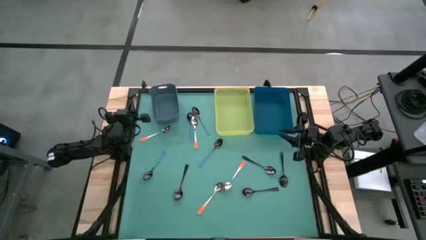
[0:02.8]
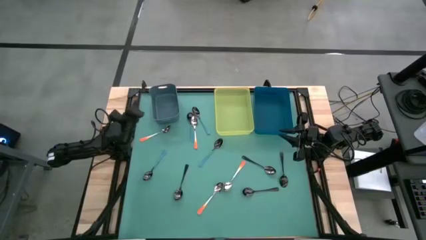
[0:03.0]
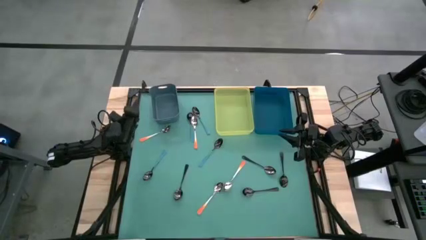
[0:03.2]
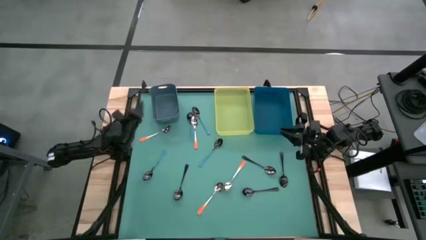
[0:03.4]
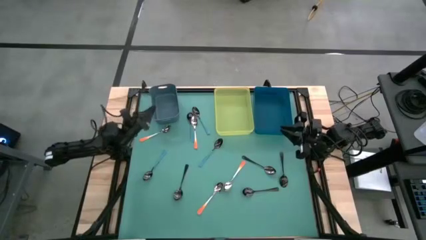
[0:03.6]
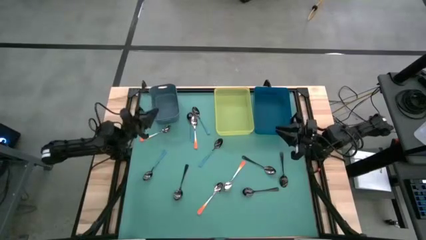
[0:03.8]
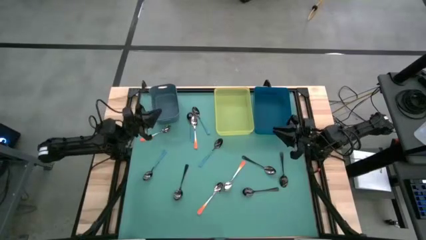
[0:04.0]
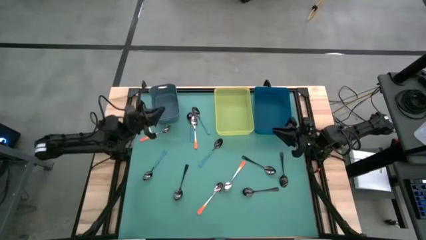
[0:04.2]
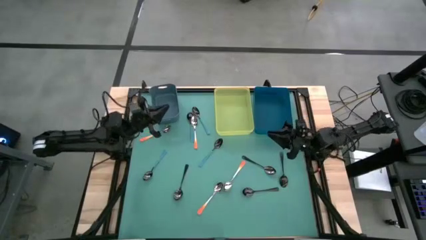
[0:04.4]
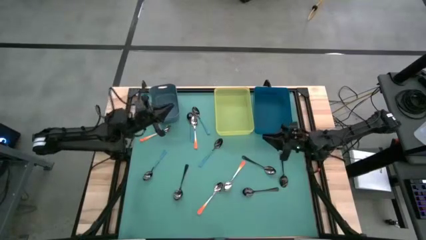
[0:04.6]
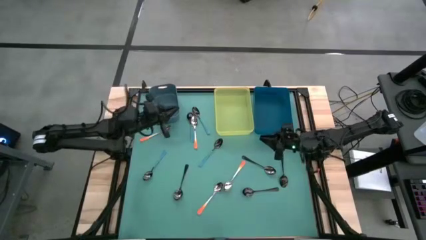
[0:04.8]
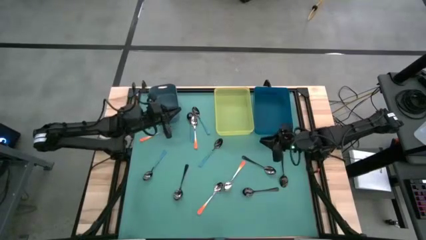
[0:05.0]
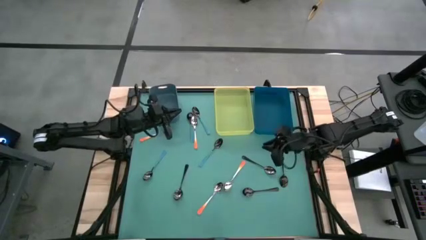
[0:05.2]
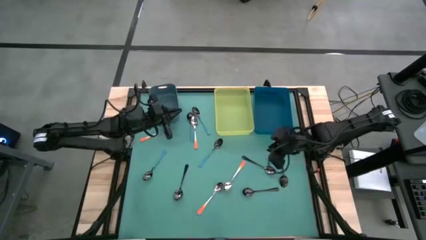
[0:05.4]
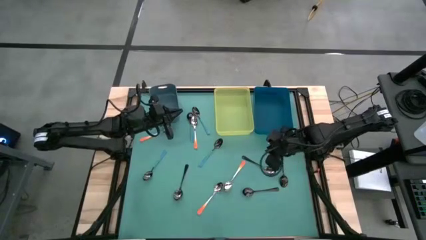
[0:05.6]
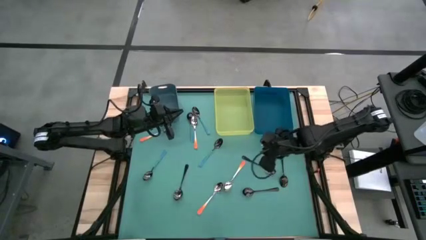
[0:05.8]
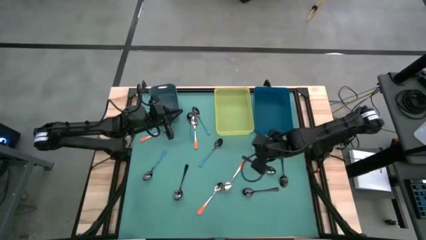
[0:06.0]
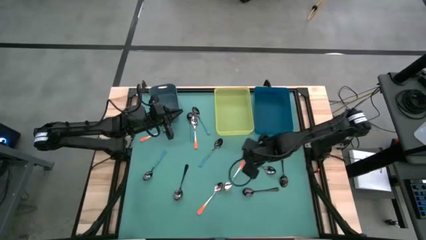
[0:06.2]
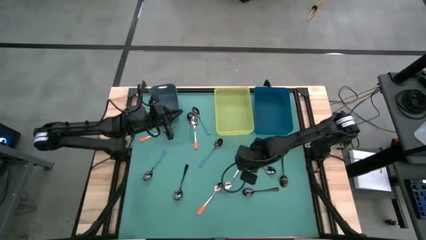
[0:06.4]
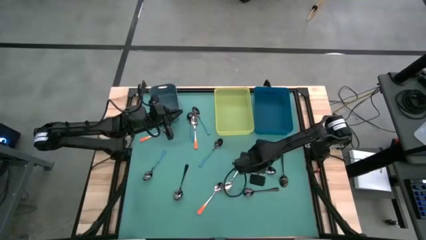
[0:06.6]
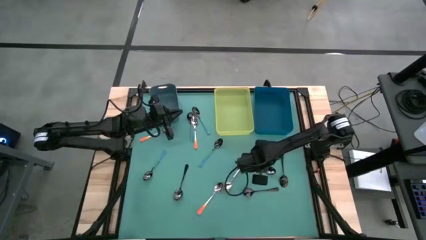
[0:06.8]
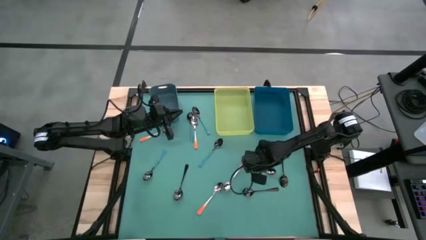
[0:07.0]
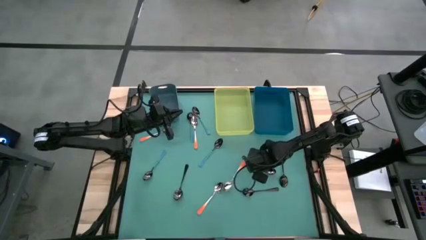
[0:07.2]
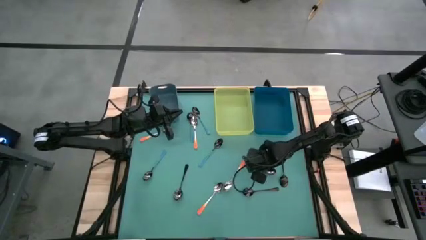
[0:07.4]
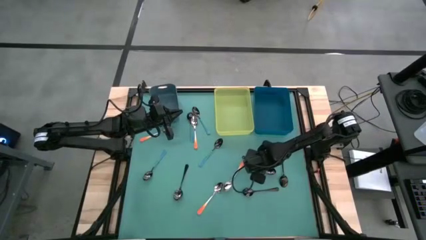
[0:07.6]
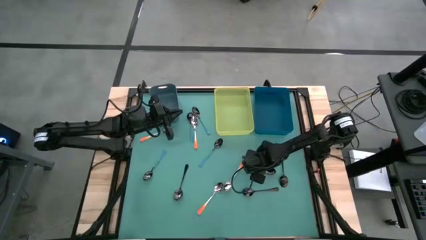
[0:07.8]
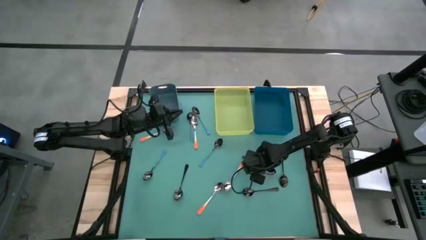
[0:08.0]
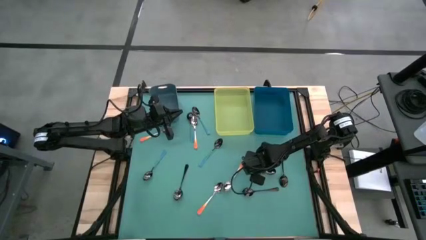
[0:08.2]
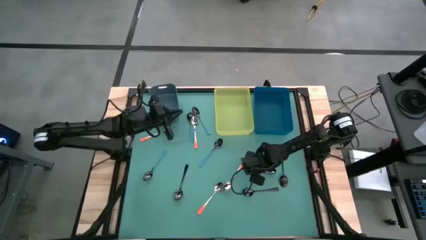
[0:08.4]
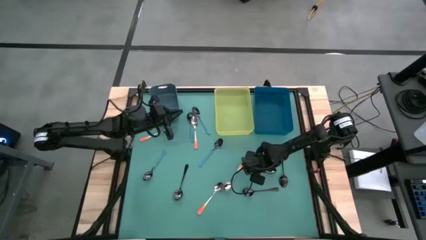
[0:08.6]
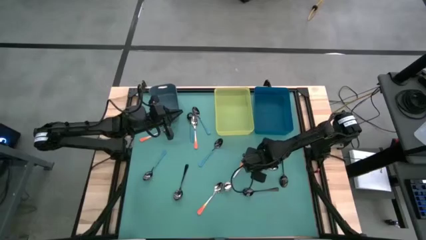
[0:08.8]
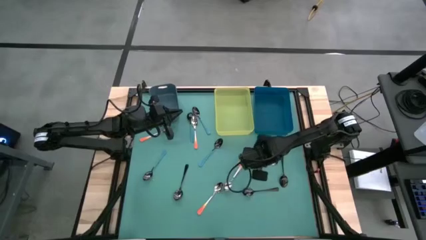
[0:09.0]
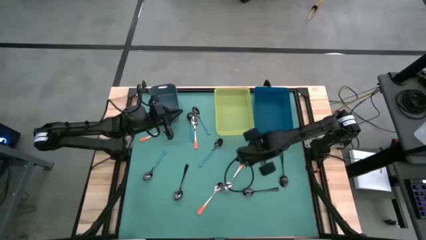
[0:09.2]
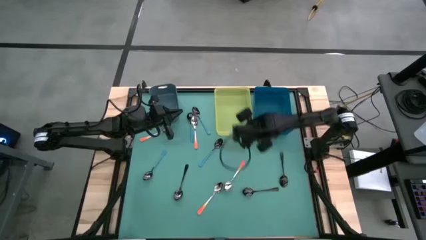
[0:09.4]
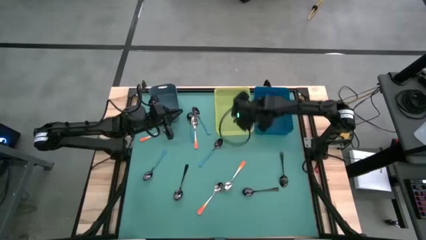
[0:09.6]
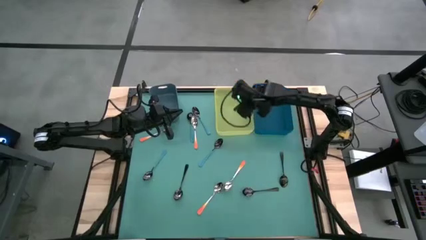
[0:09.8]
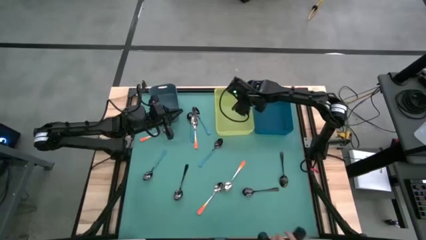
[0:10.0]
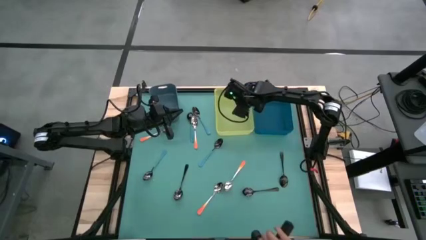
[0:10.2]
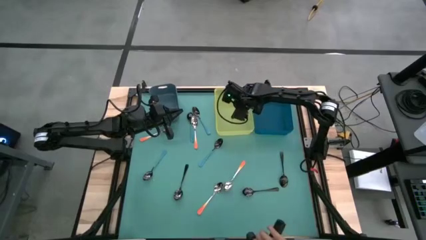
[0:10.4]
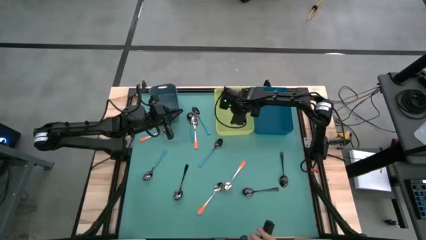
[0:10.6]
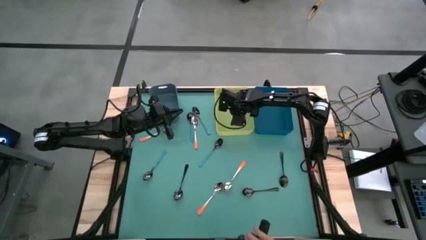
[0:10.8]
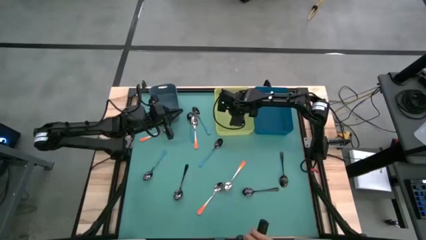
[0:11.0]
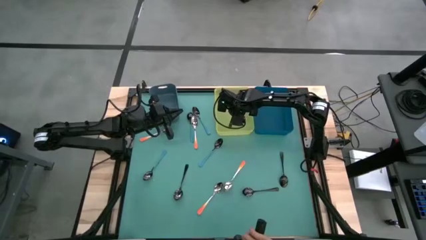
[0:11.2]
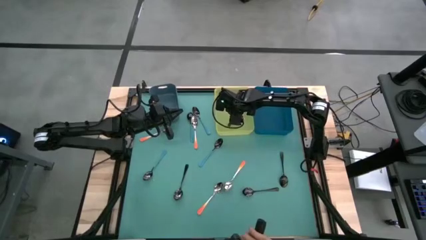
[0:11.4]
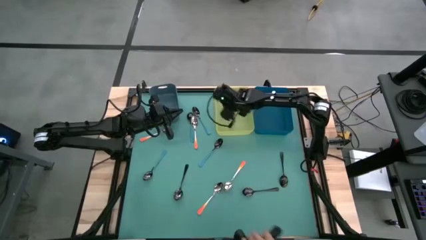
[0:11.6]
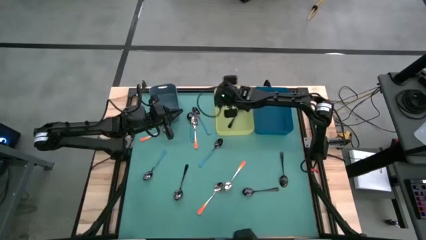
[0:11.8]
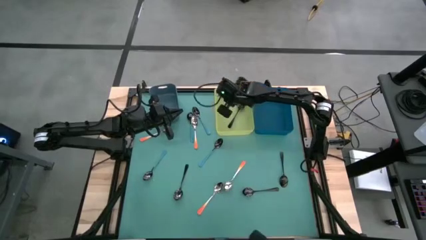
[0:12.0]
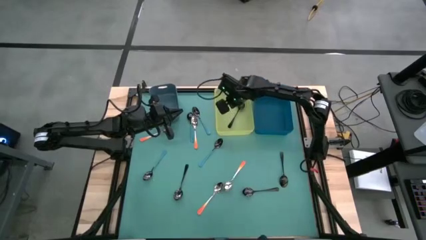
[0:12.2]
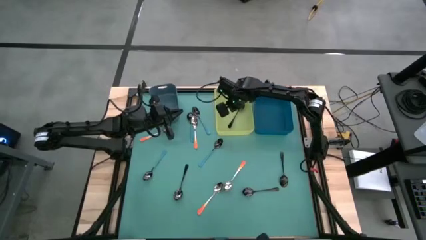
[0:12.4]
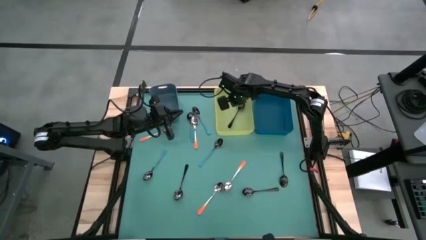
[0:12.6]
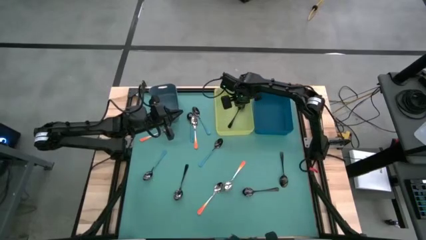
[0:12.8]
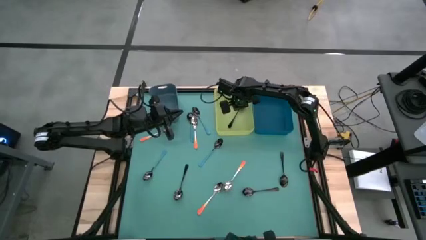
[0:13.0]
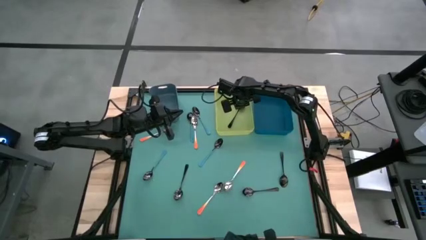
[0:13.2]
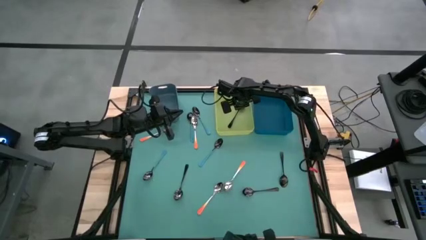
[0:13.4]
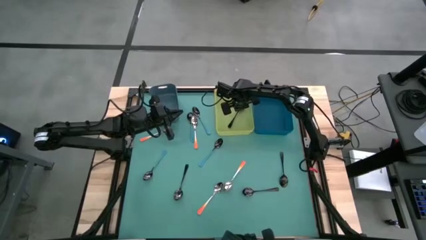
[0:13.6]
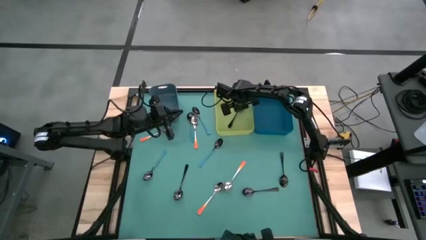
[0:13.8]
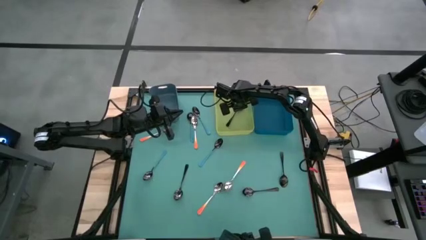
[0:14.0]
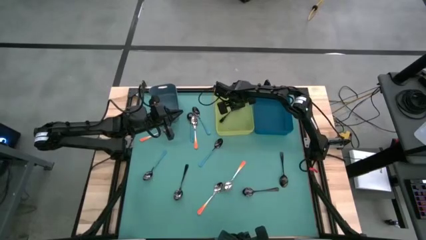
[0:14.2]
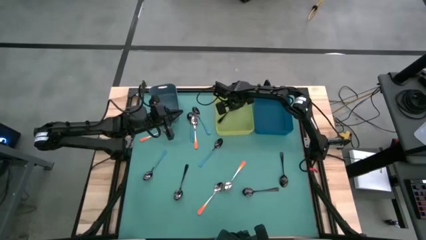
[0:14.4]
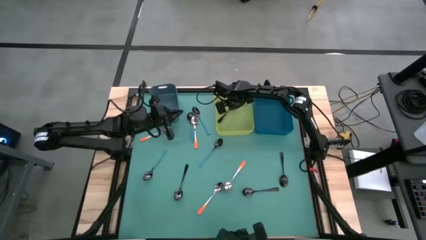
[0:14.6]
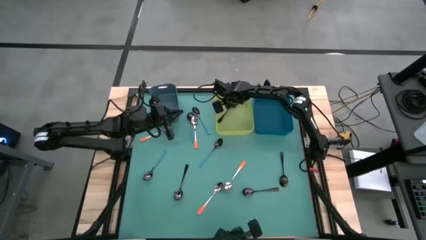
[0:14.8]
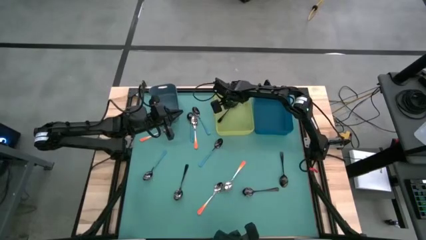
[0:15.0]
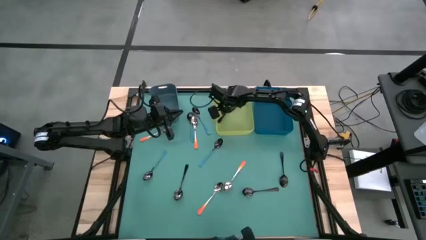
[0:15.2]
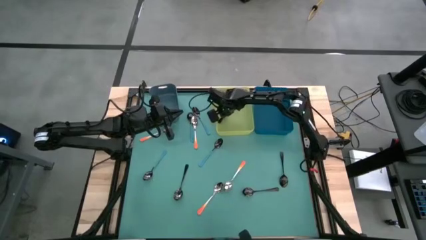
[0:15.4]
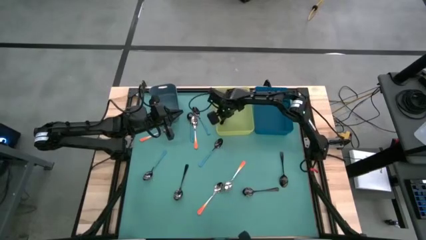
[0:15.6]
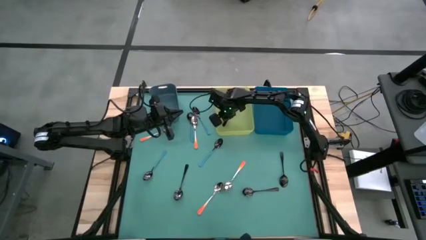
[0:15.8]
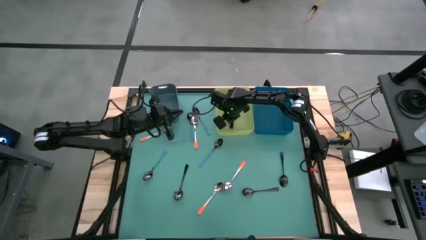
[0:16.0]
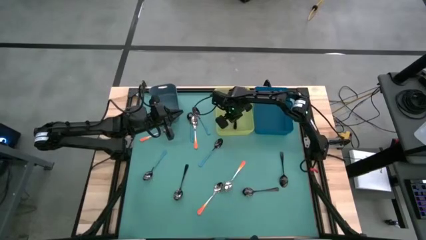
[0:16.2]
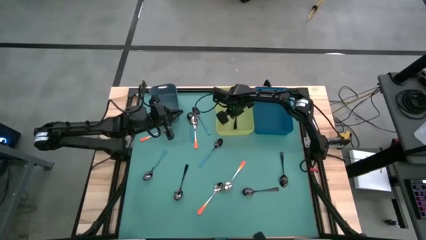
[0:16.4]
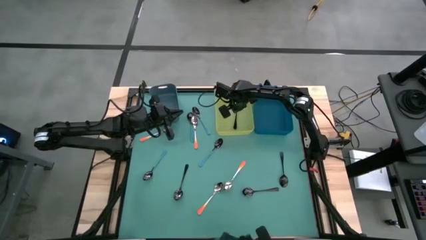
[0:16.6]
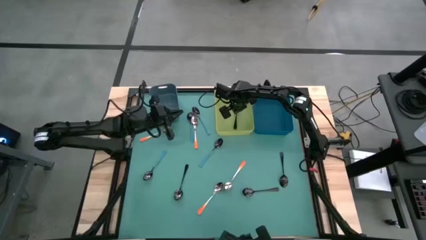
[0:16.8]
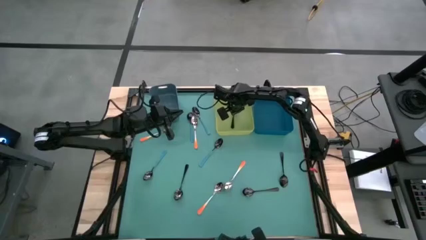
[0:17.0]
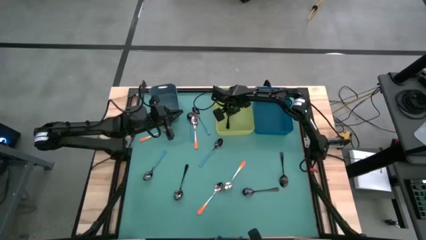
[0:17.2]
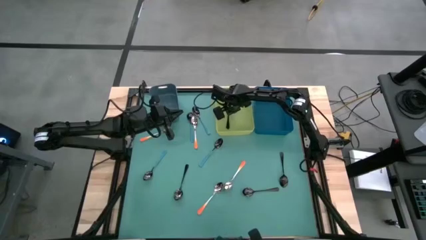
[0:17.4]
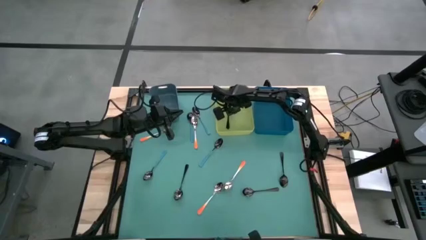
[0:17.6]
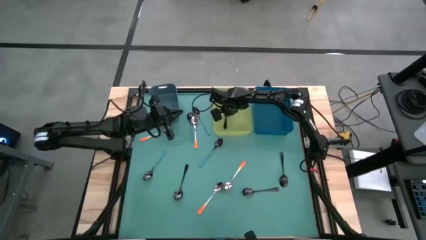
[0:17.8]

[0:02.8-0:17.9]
Task: Sort silverware by color (type)
Put the black spoon into the yellow bin
